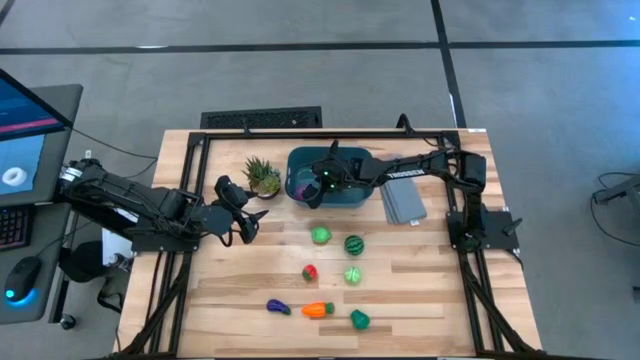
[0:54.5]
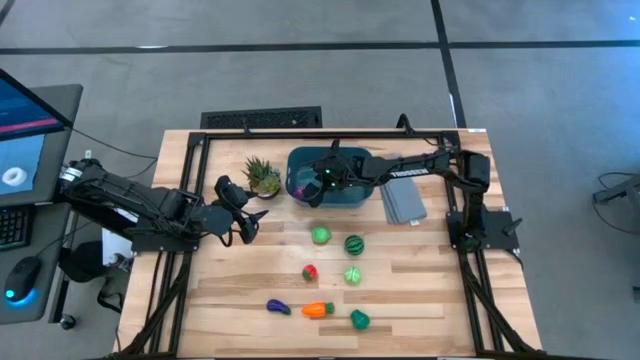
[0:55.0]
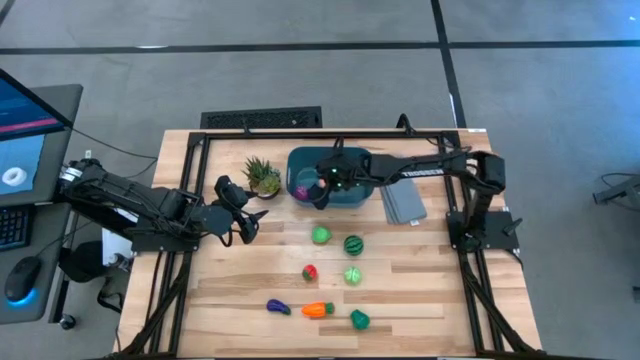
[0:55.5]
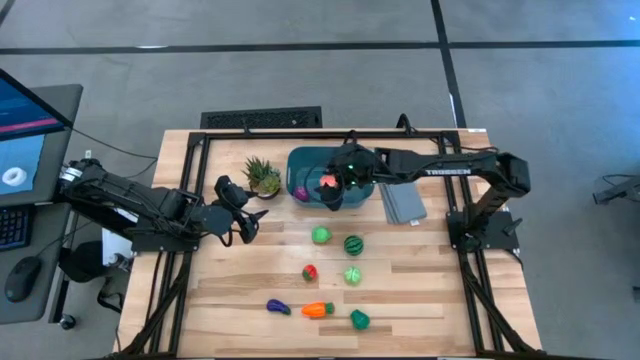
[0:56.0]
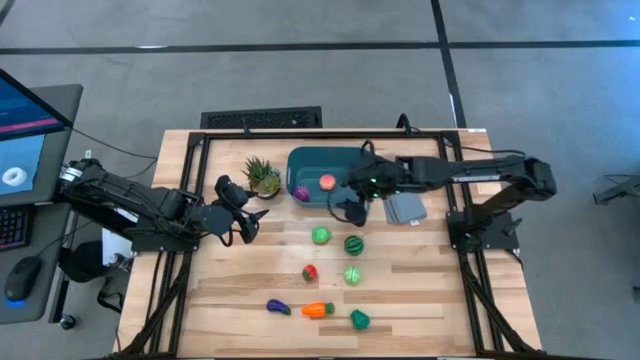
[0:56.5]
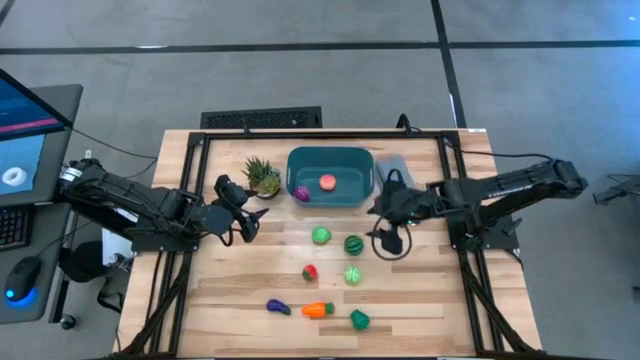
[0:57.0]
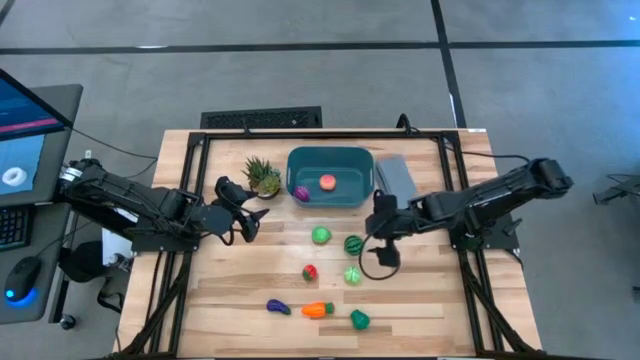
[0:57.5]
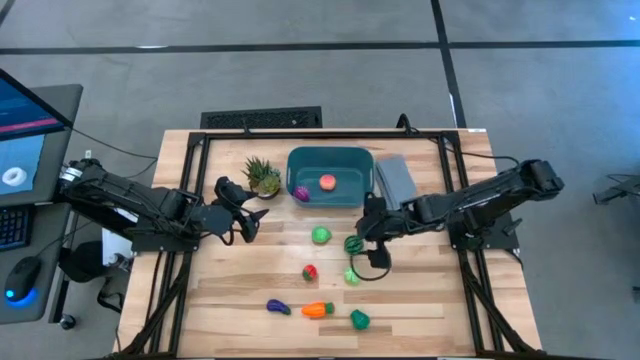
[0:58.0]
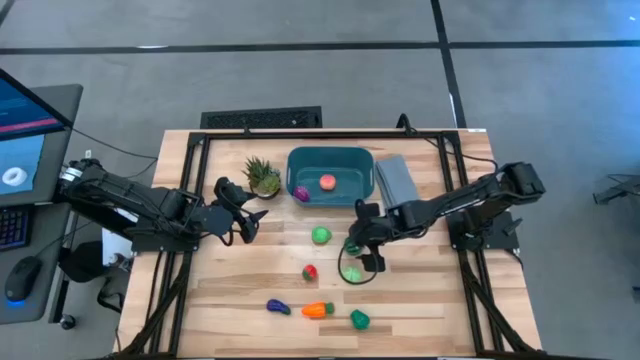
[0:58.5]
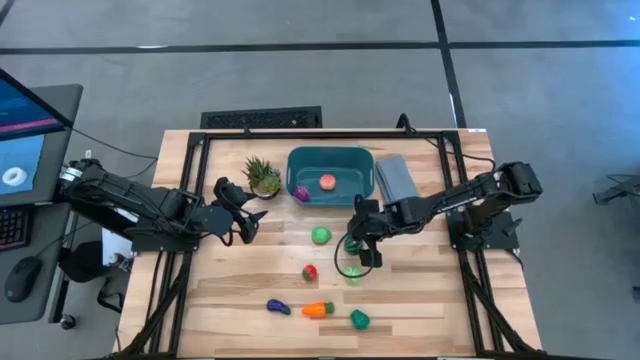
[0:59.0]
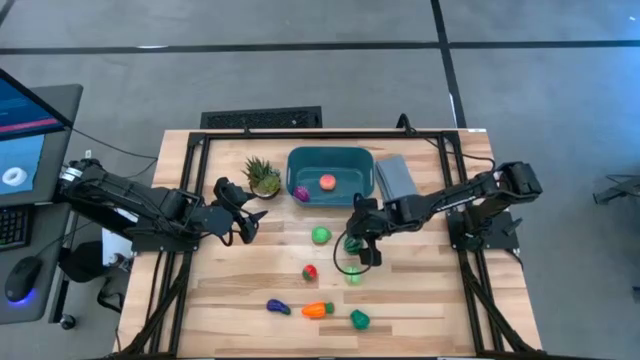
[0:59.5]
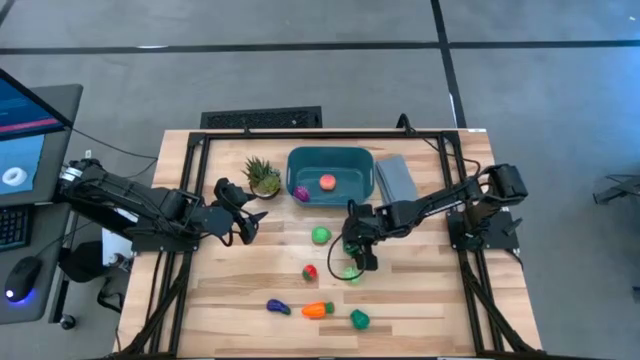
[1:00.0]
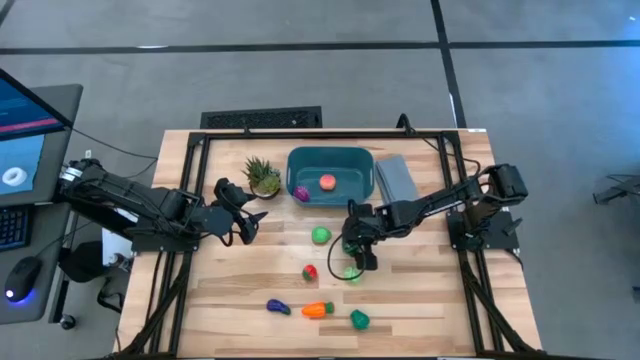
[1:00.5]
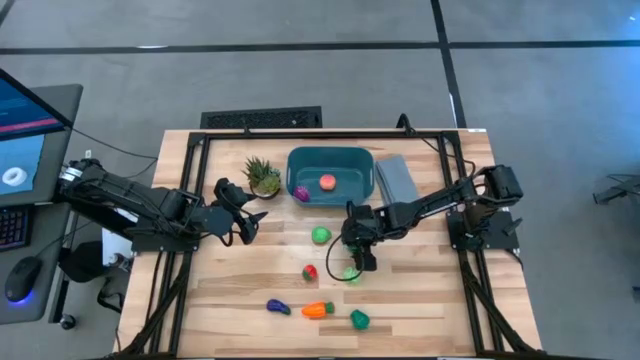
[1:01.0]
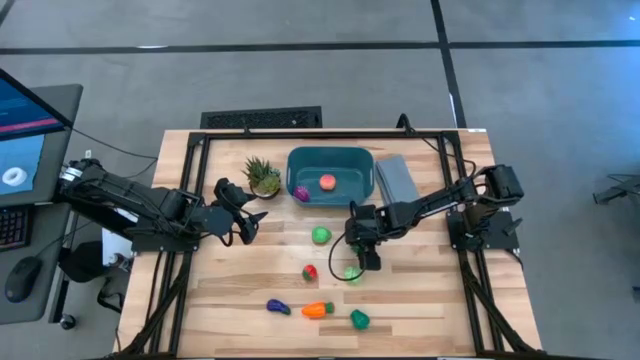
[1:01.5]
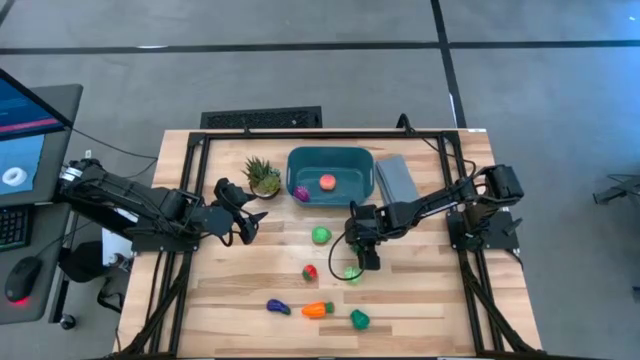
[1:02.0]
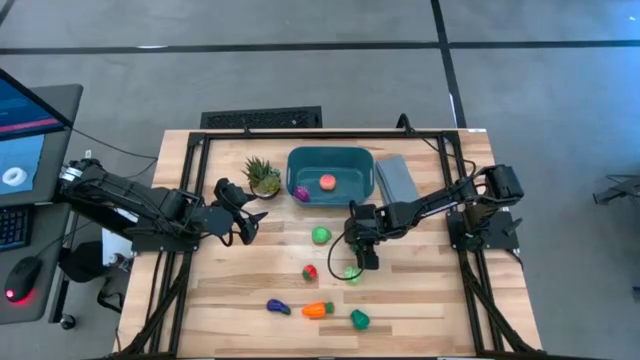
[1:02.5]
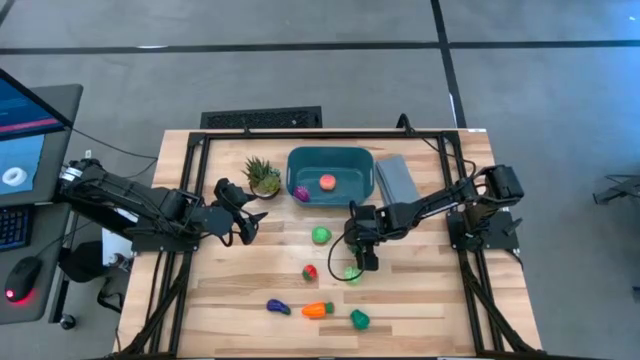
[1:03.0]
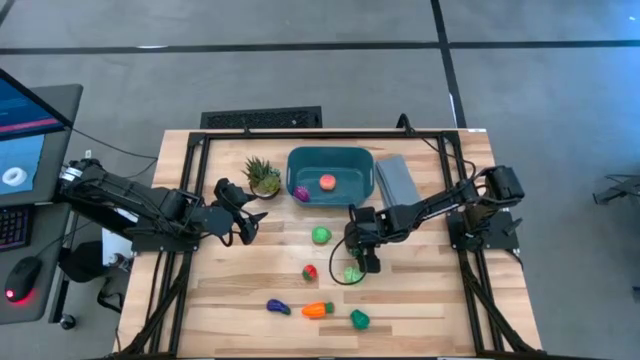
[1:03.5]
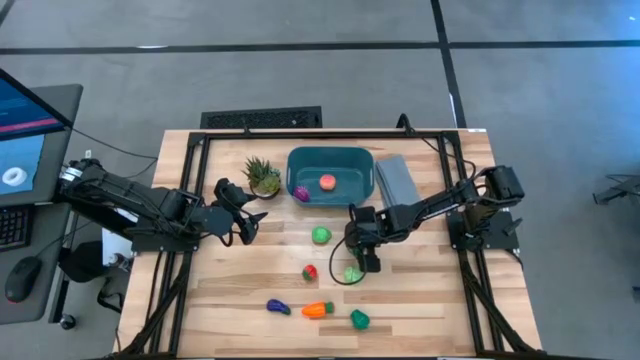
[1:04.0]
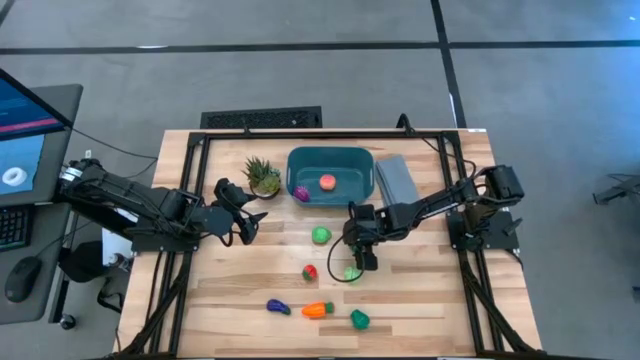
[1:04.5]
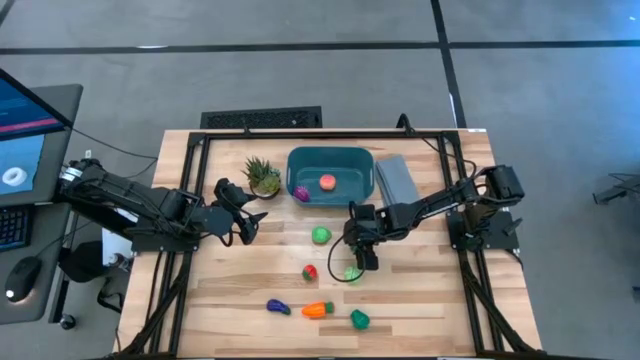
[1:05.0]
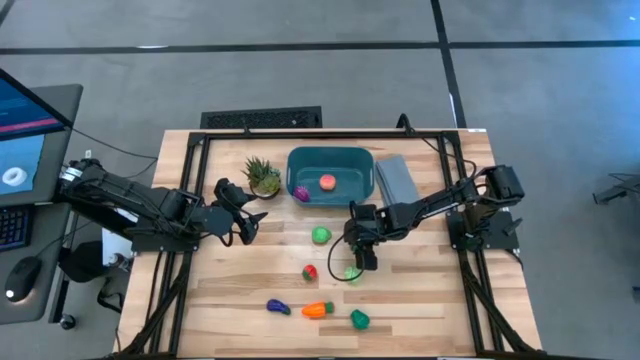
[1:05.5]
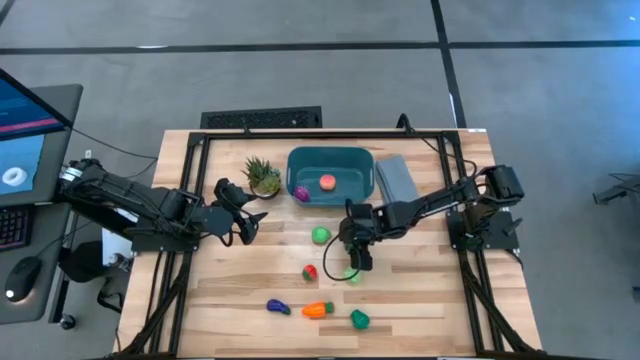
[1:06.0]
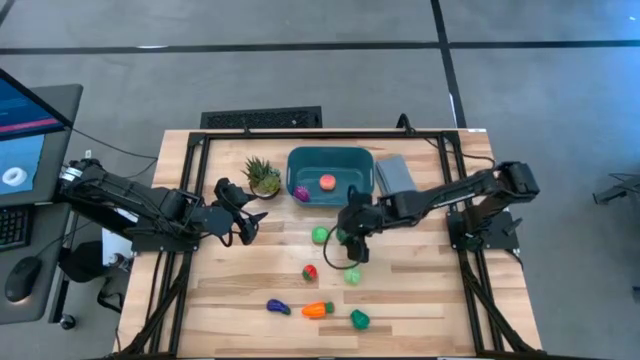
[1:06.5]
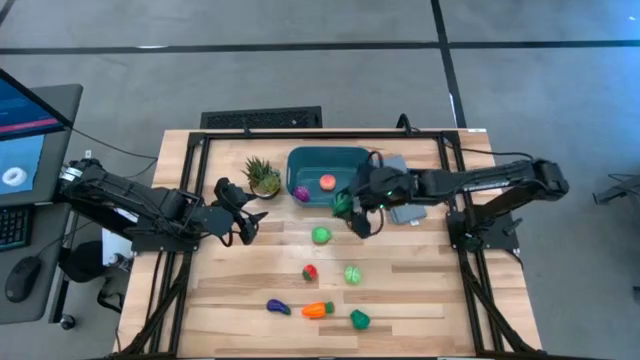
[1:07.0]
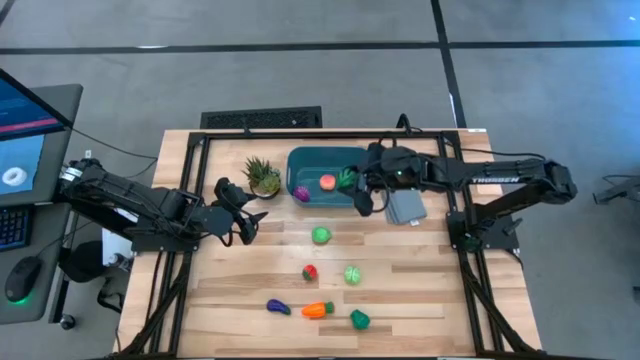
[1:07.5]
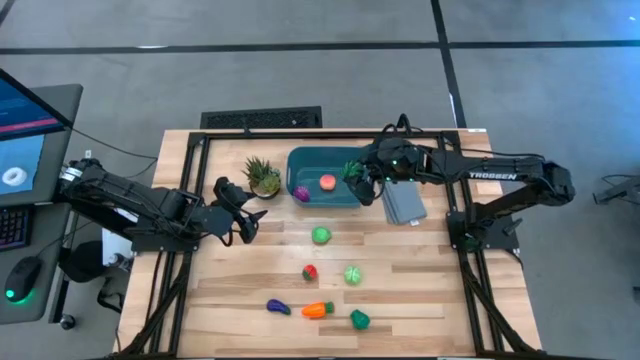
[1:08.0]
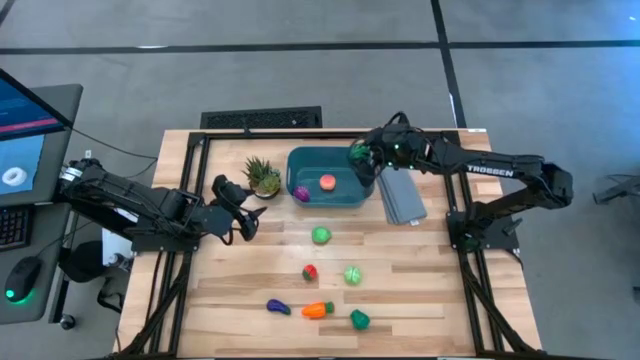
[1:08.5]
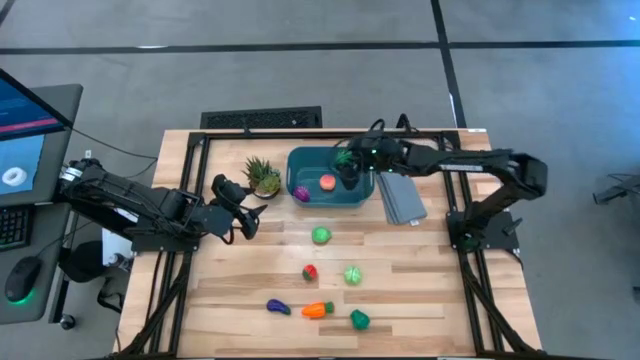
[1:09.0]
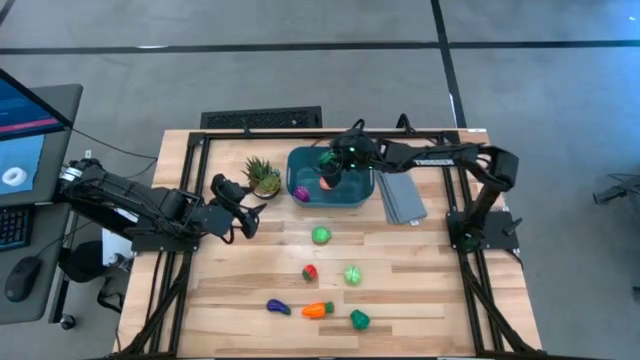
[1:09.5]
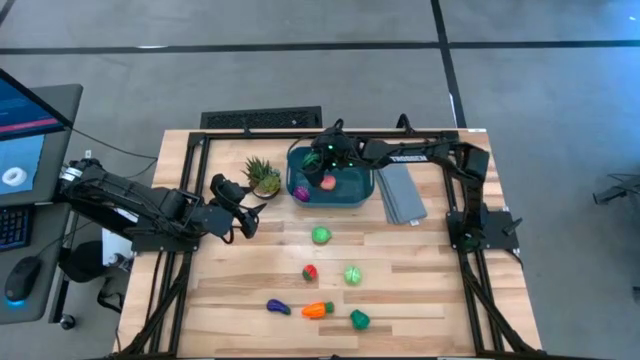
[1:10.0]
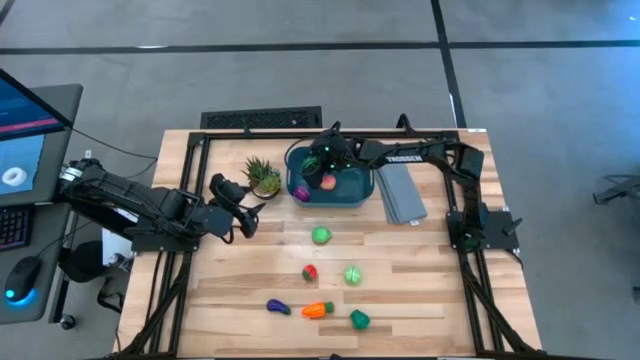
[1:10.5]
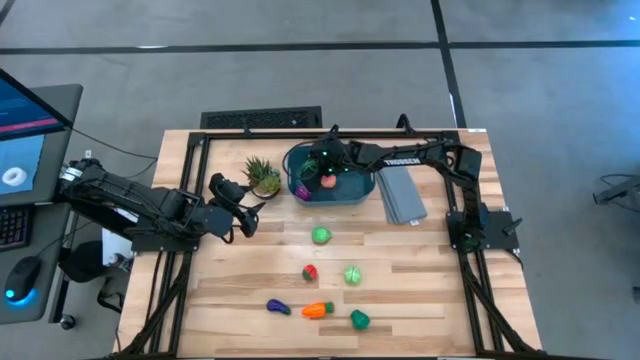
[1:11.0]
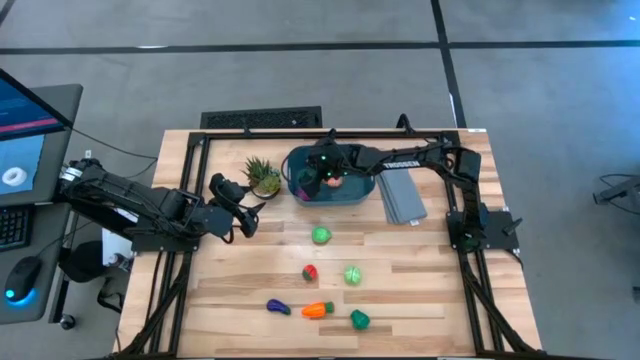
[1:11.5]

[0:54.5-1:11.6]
Task: Pick and placing Produce into tupperware
Put the watermelon into the blue bin
